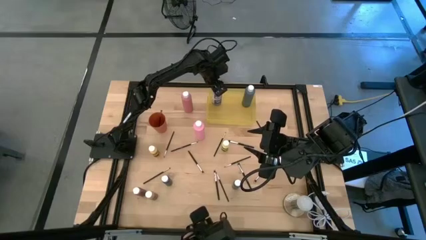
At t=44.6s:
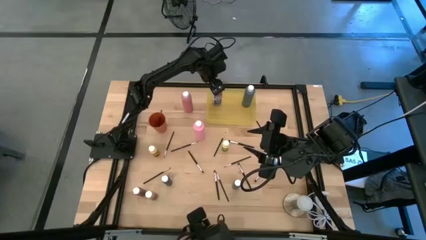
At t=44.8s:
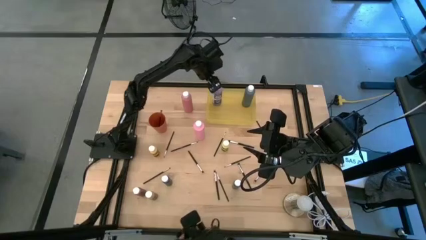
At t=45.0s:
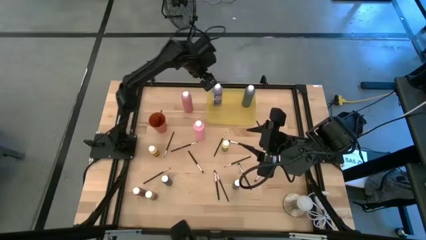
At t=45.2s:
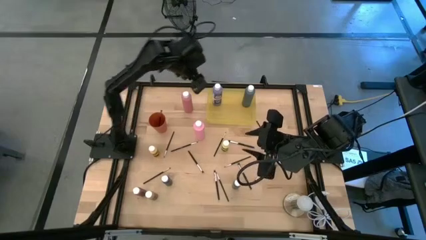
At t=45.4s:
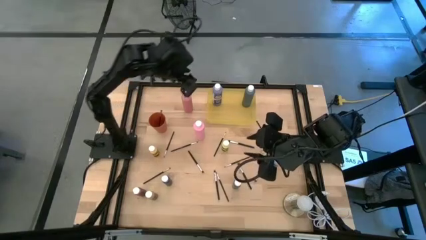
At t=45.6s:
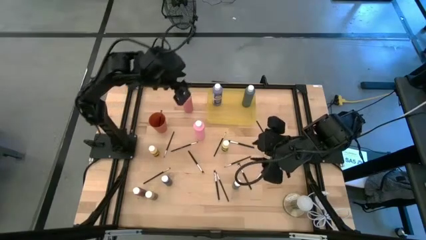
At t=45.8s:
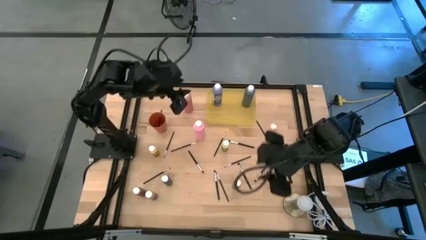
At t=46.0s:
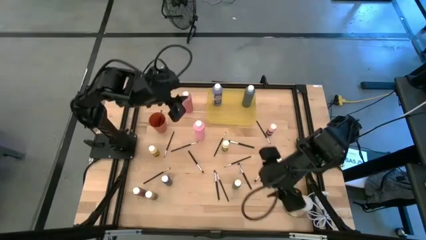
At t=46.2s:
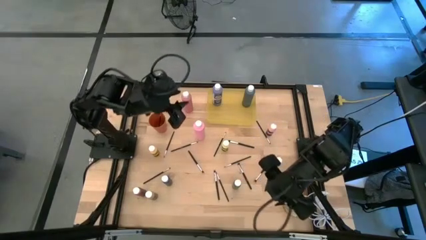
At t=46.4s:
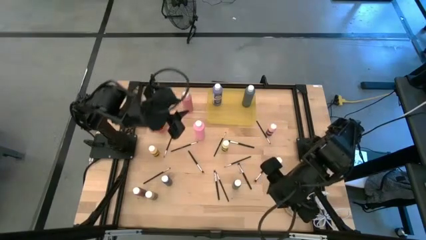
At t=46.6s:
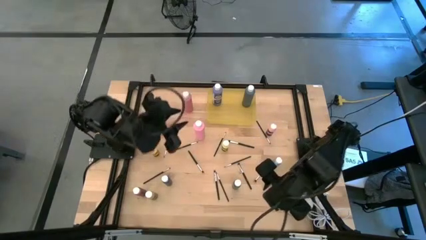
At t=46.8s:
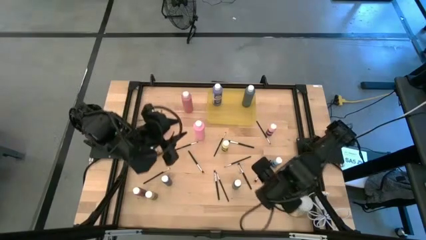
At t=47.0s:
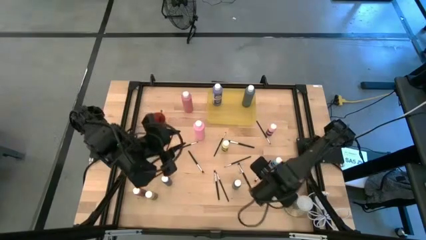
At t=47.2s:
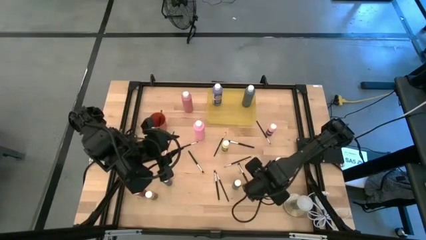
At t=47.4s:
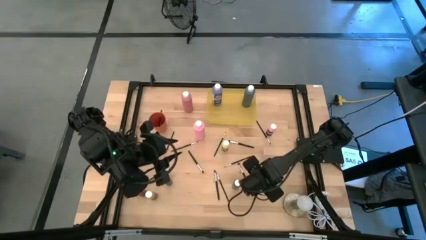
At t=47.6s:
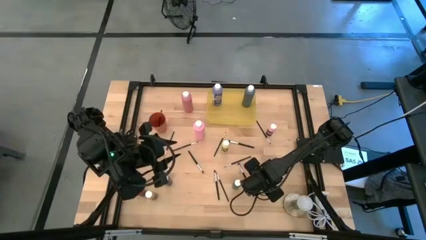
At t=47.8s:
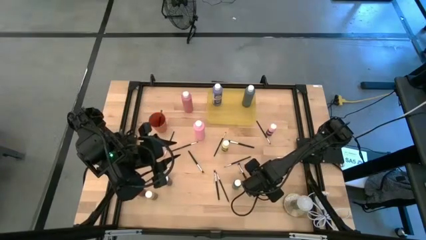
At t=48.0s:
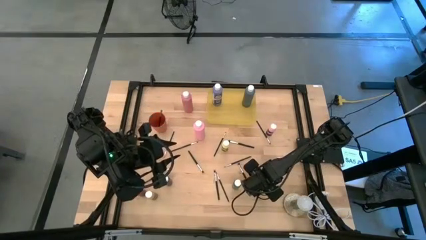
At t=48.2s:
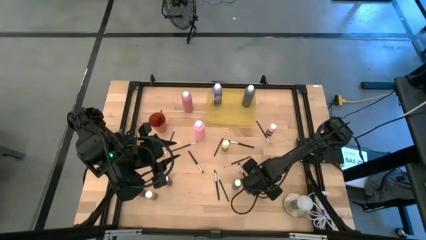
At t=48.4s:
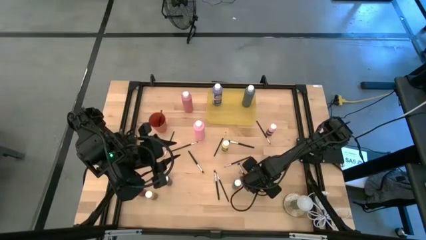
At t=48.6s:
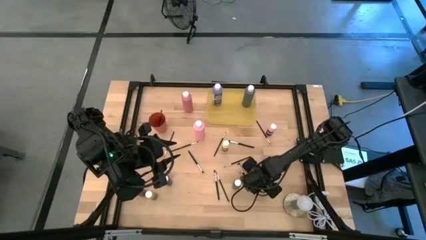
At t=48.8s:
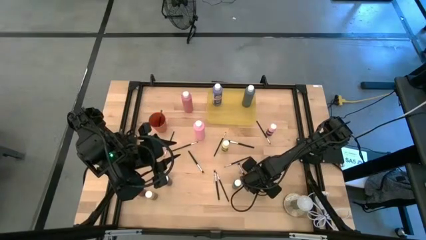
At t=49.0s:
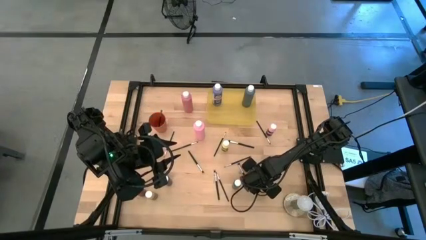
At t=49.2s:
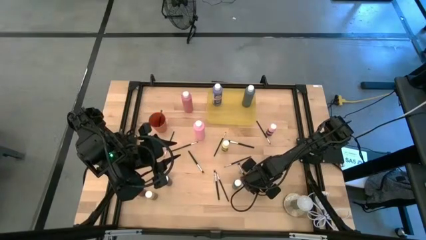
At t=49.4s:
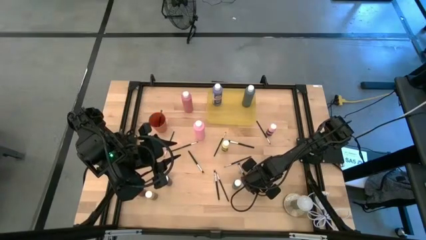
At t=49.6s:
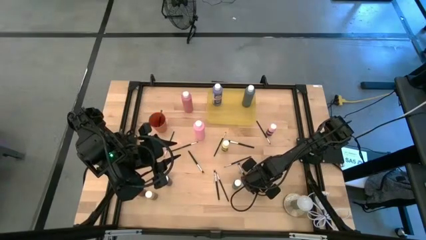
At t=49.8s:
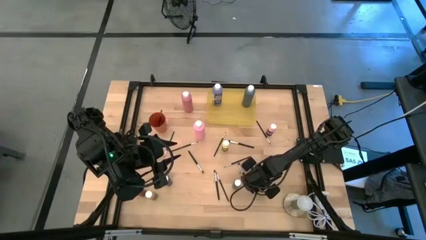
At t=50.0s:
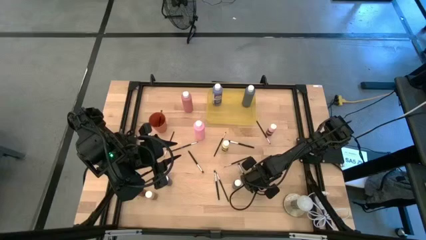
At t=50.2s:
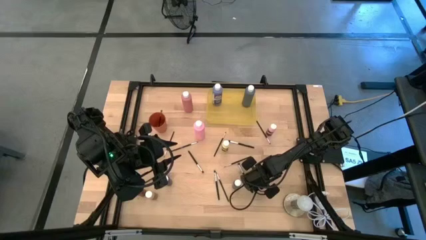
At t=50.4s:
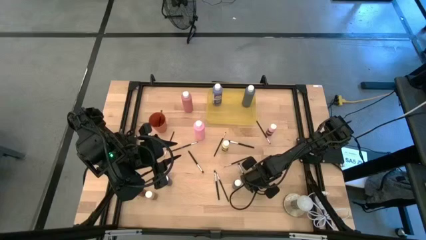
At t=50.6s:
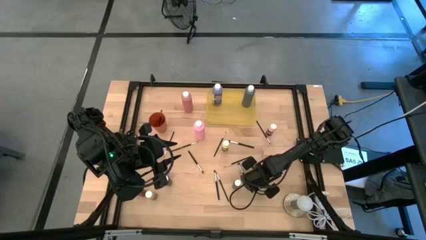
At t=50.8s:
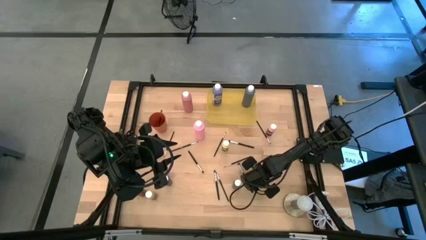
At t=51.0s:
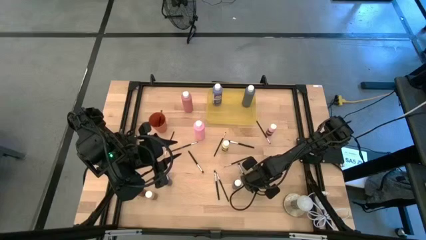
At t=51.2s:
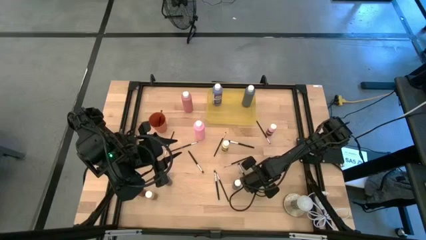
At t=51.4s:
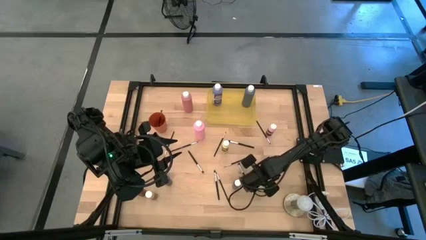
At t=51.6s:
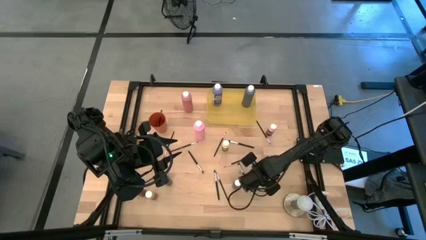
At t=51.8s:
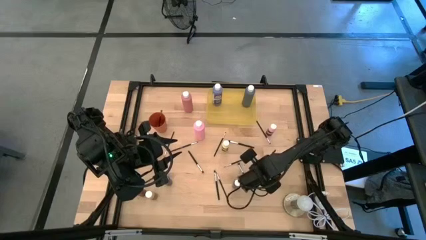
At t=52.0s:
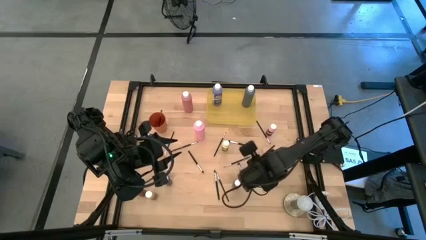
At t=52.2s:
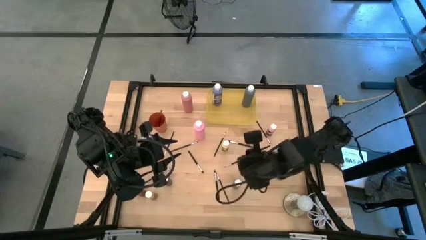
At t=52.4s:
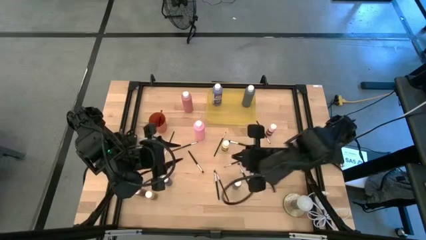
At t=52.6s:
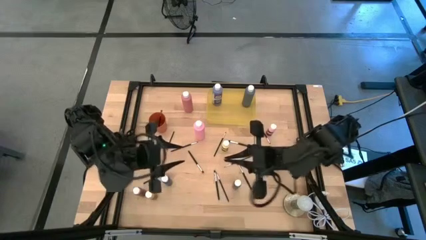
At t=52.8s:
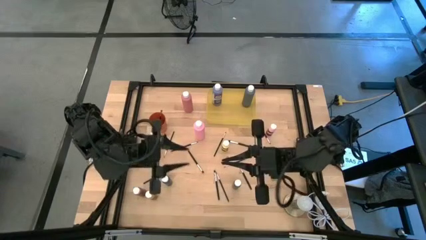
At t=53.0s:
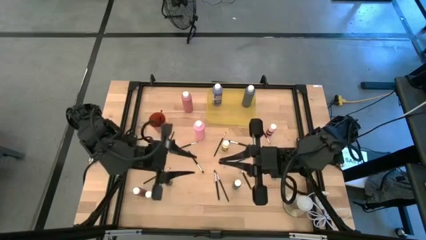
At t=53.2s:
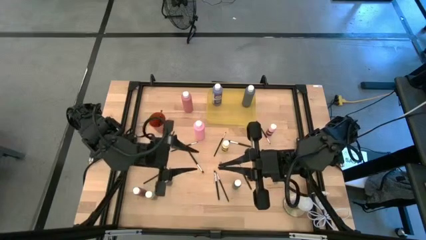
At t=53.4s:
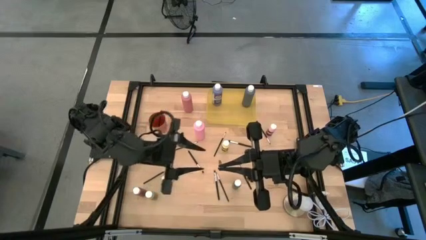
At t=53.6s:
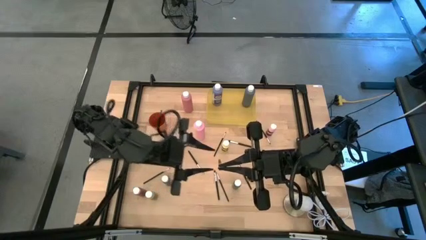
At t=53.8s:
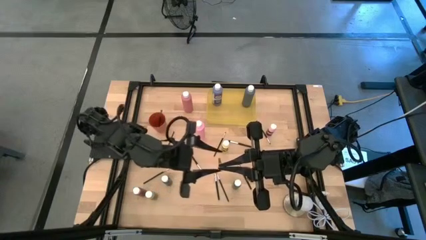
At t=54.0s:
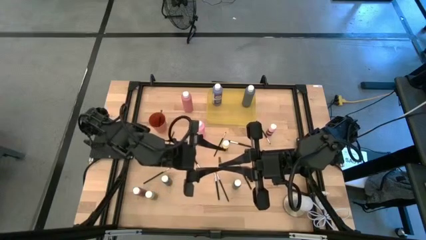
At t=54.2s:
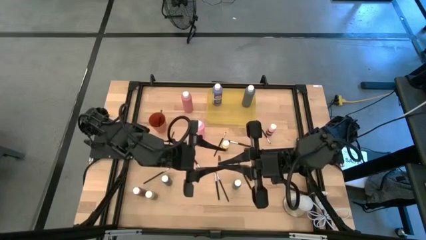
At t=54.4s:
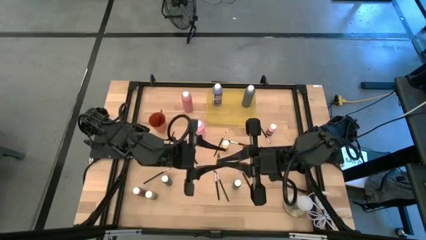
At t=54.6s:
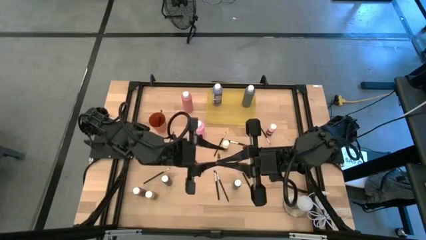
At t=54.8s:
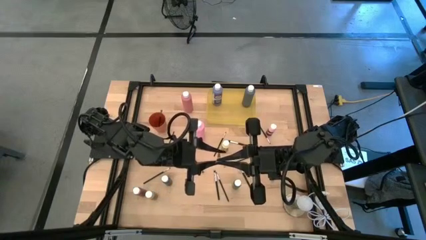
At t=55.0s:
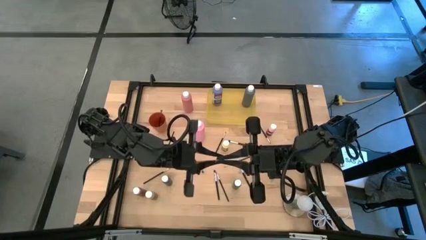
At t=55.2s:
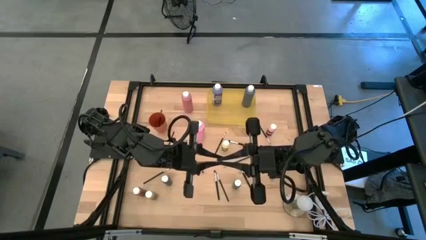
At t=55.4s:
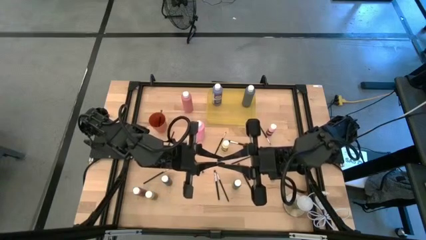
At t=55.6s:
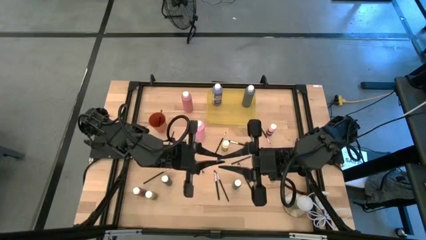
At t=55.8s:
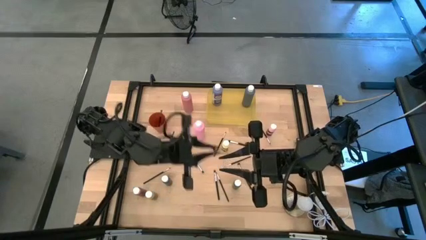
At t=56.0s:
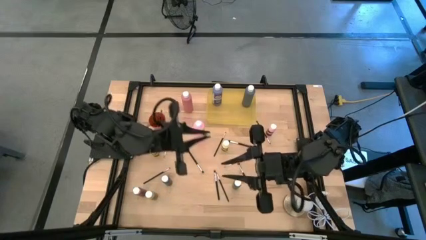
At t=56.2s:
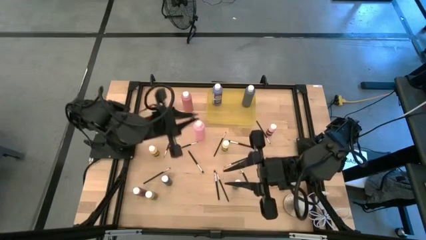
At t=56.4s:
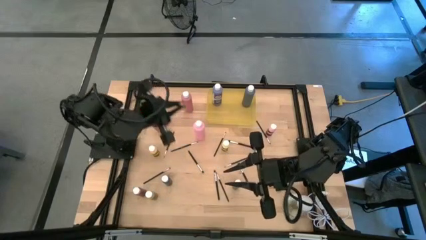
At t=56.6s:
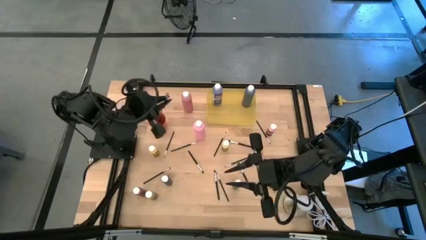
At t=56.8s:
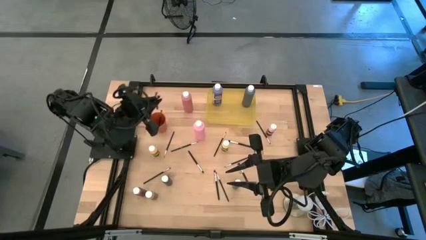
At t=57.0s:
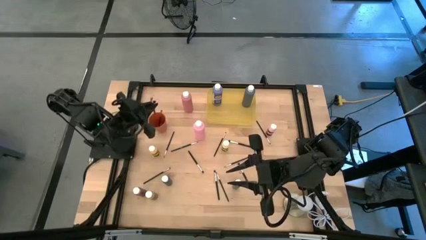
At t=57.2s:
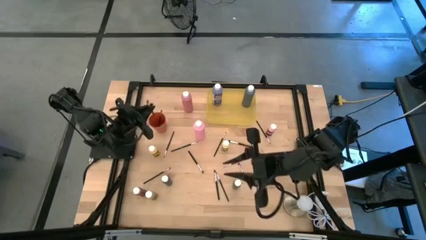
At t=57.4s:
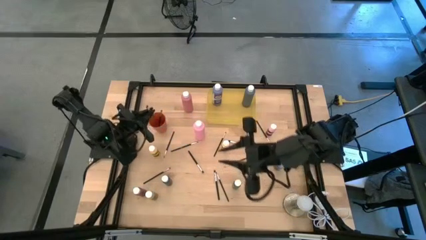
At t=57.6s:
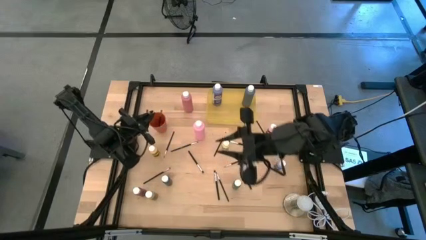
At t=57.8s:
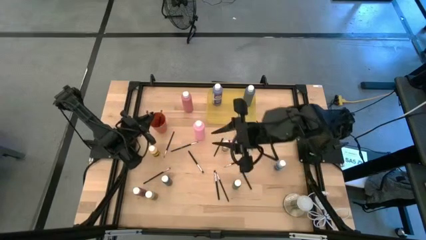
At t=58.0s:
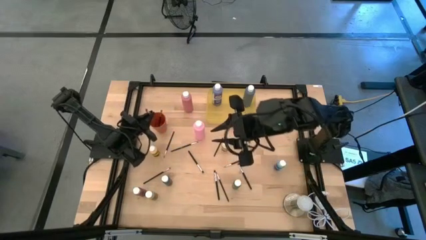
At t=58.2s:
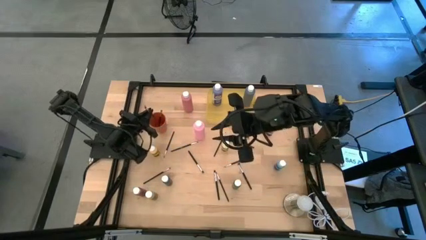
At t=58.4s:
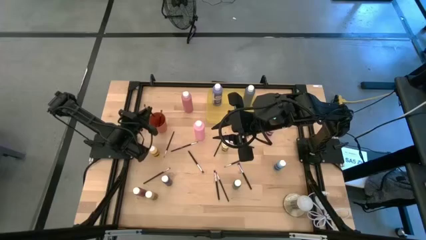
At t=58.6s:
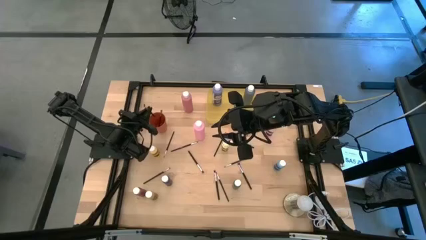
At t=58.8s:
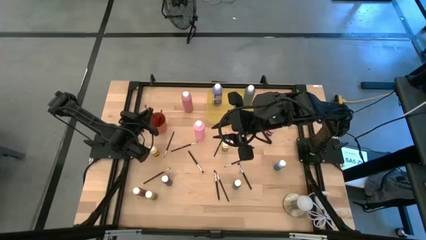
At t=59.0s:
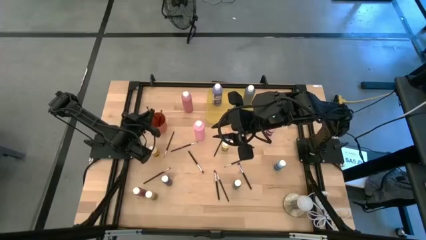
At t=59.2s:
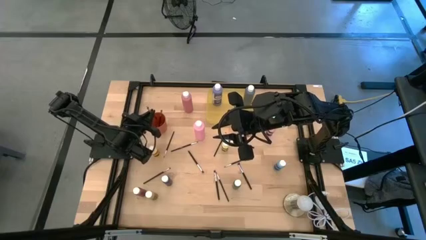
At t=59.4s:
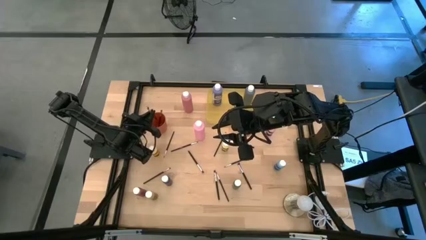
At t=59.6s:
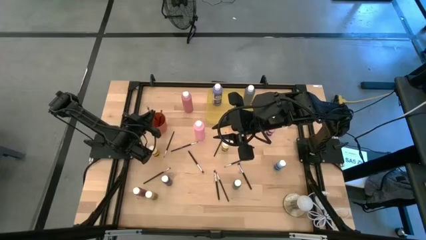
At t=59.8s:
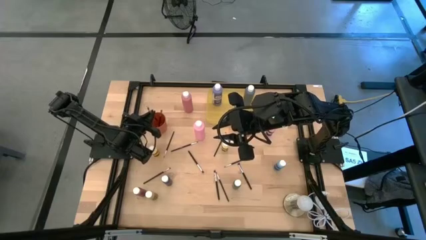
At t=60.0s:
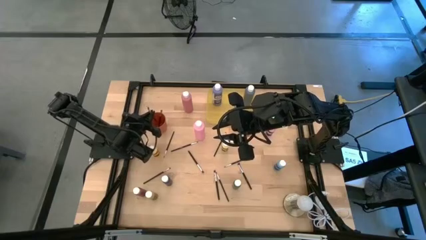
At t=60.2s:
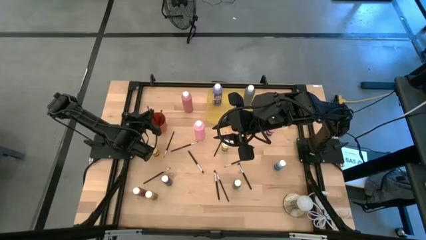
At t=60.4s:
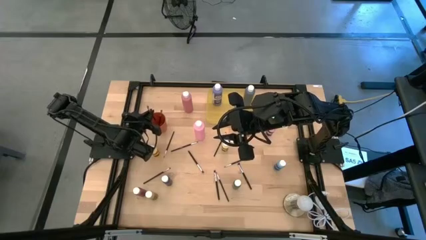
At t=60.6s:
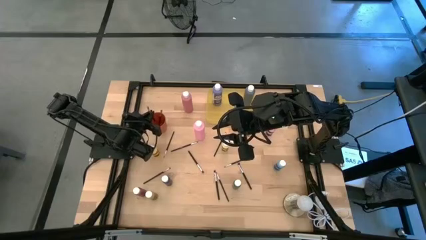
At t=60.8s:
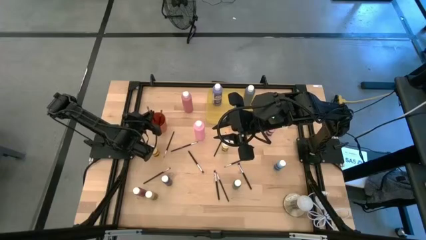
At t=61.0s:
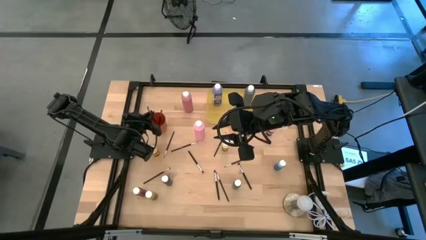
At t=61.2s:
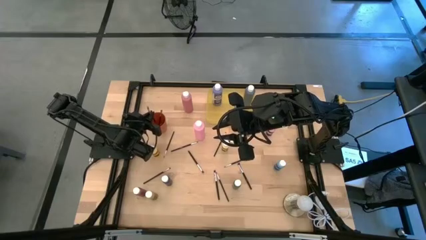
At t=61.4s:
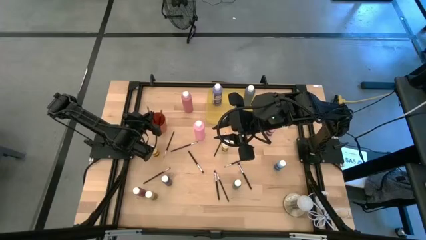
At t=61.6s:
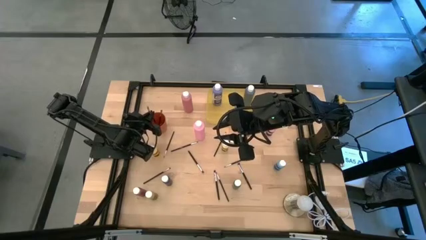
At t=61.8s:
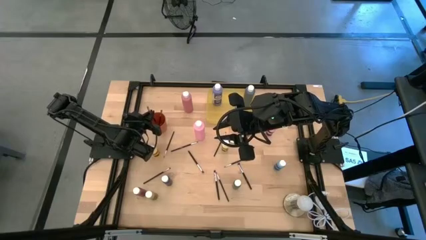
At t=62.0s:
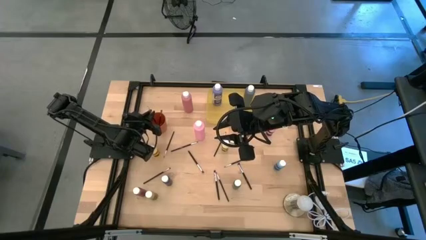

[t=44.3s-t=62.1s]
Task: Pick & Place Paint Supplies
Put the silver paint brush into the orange cup
